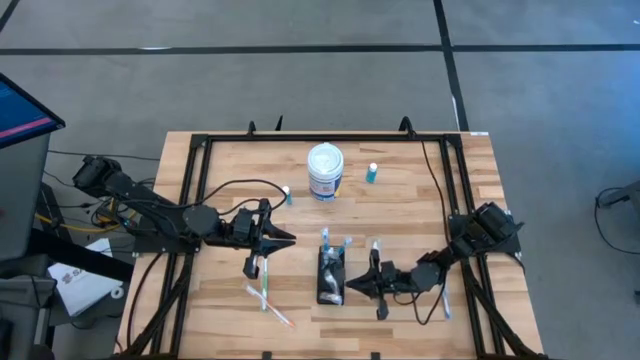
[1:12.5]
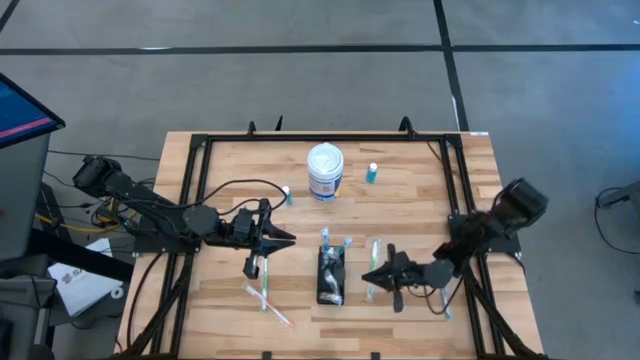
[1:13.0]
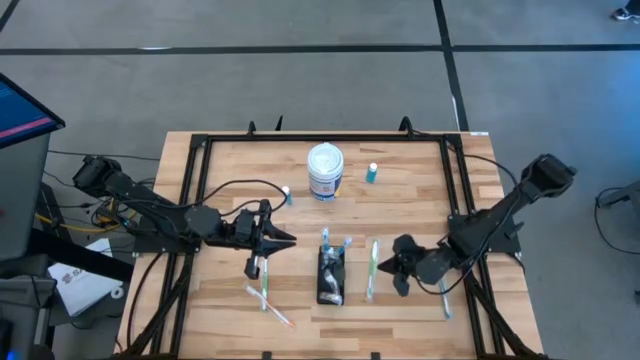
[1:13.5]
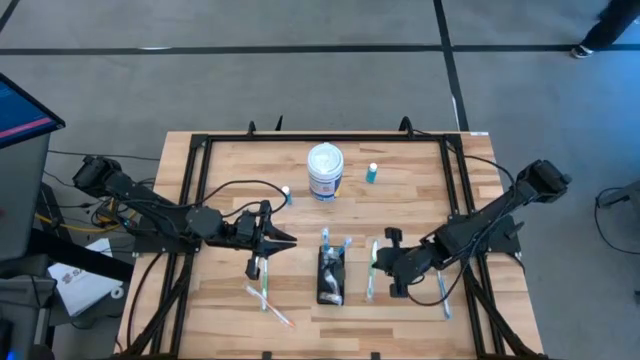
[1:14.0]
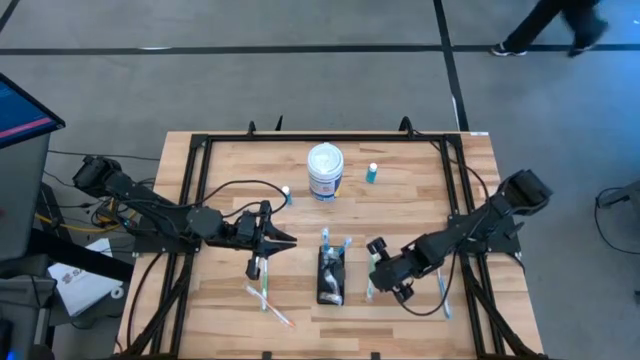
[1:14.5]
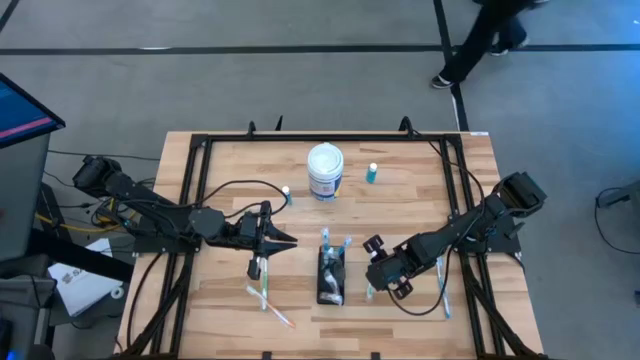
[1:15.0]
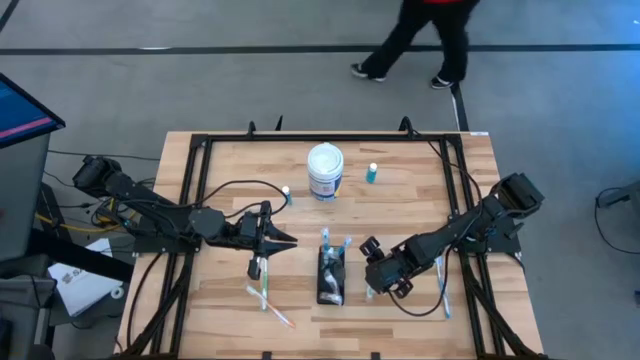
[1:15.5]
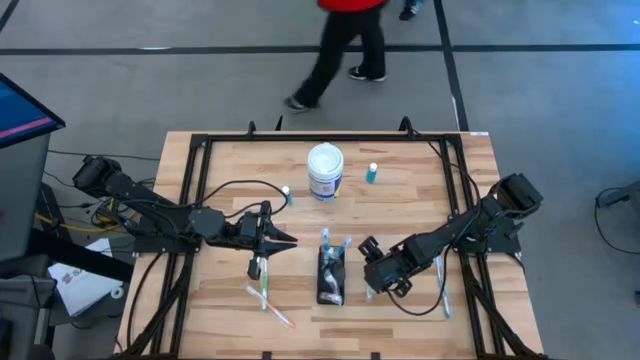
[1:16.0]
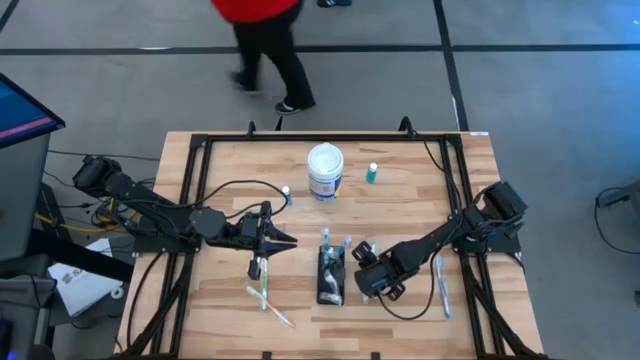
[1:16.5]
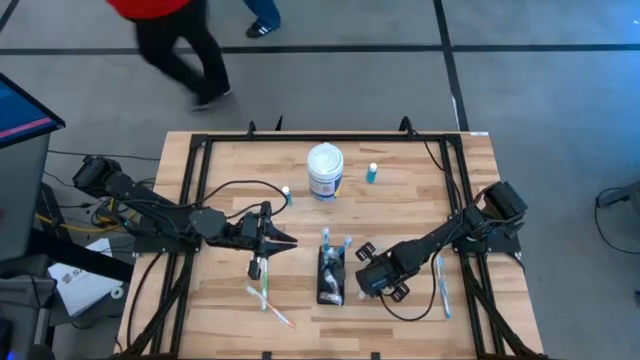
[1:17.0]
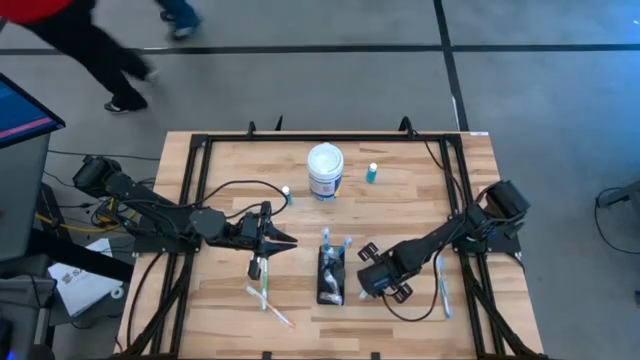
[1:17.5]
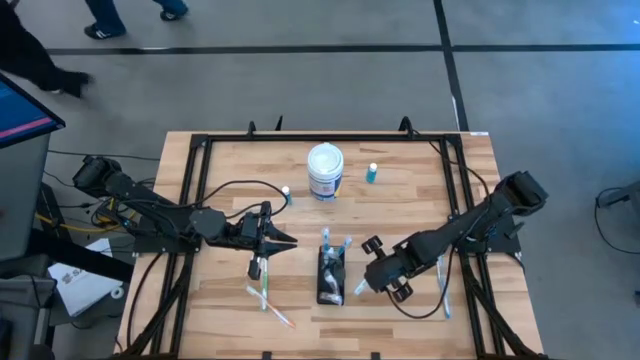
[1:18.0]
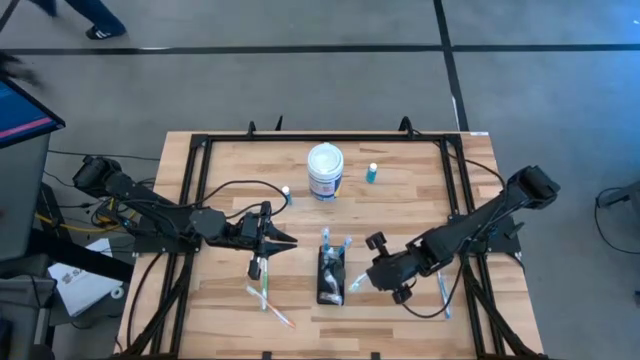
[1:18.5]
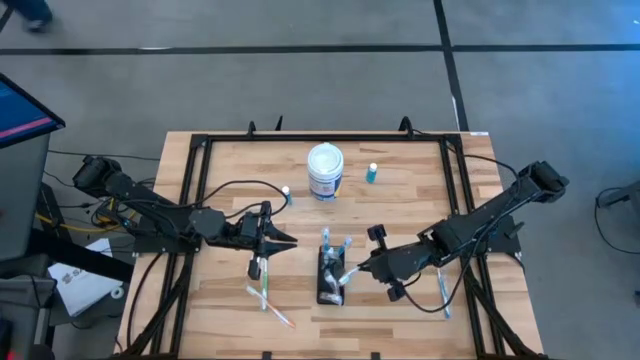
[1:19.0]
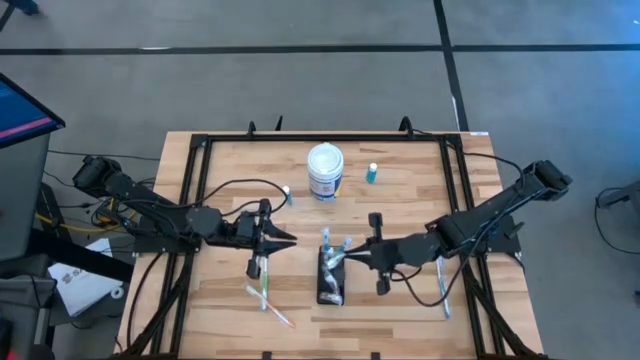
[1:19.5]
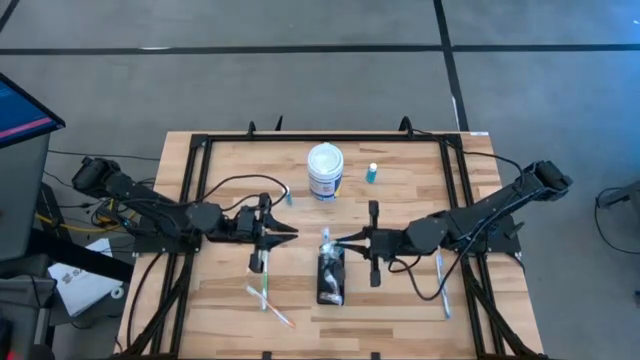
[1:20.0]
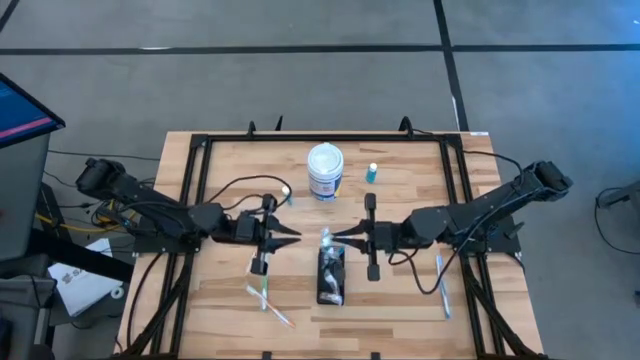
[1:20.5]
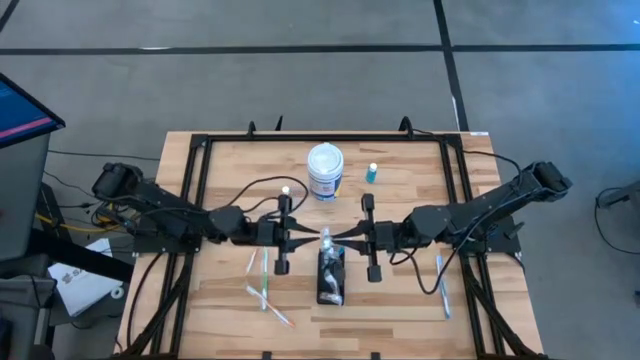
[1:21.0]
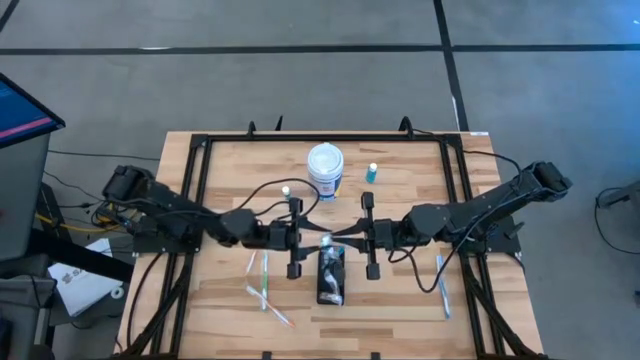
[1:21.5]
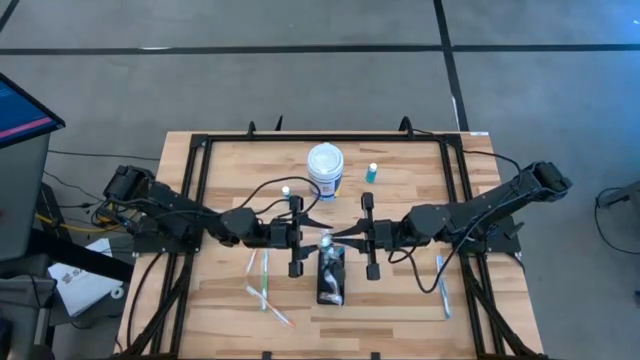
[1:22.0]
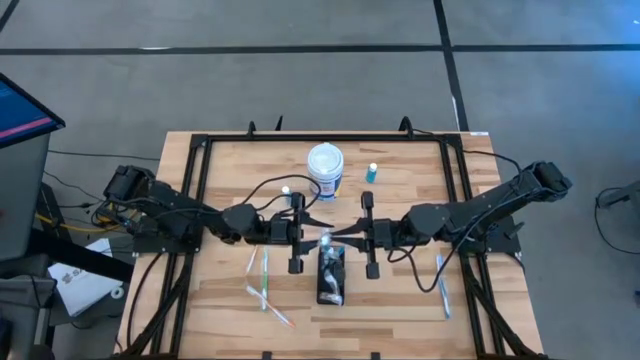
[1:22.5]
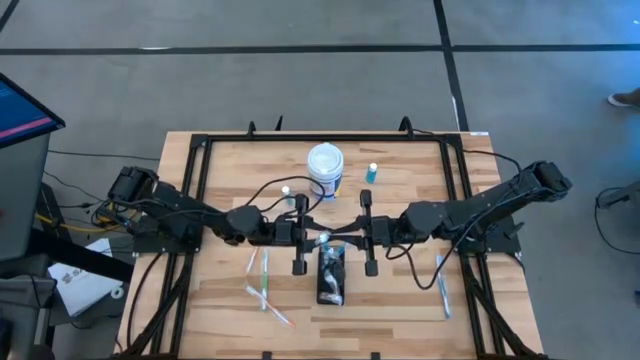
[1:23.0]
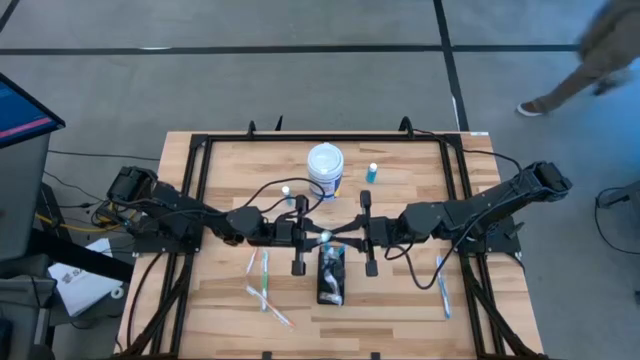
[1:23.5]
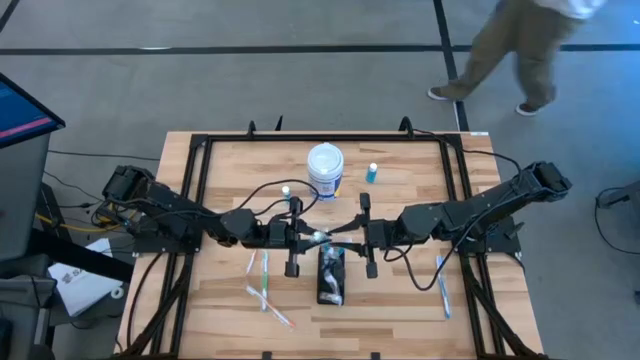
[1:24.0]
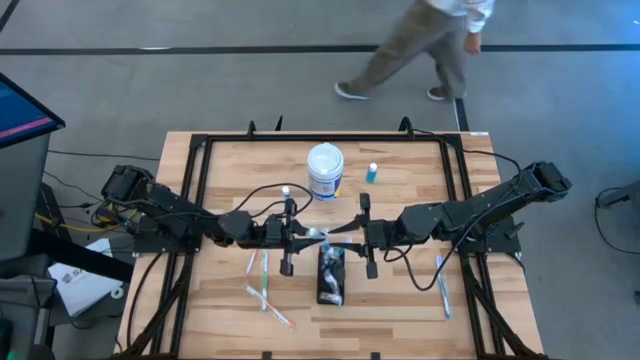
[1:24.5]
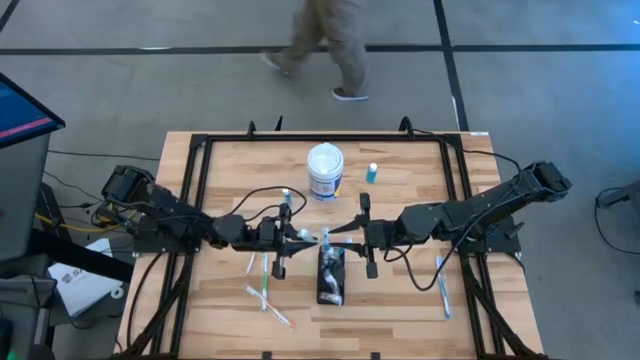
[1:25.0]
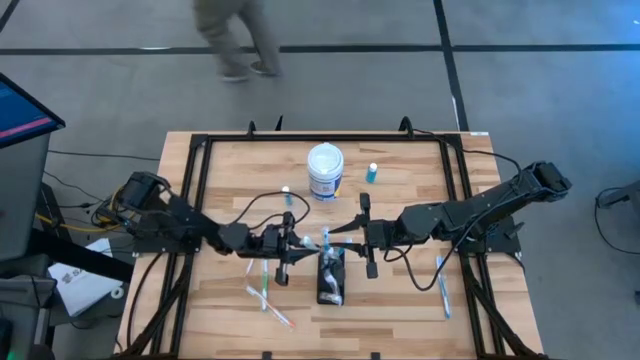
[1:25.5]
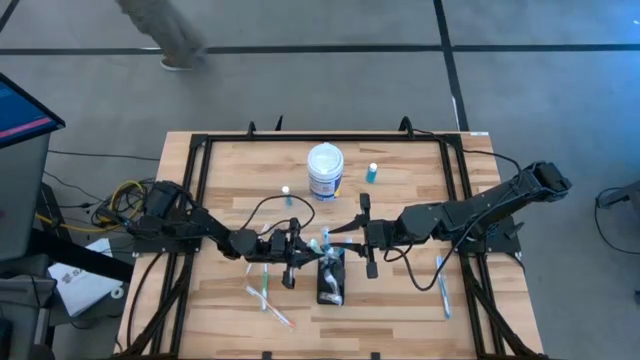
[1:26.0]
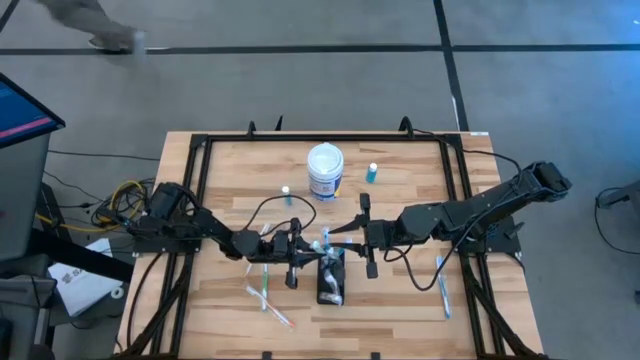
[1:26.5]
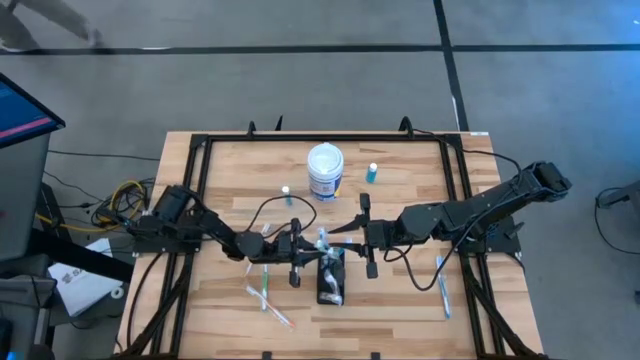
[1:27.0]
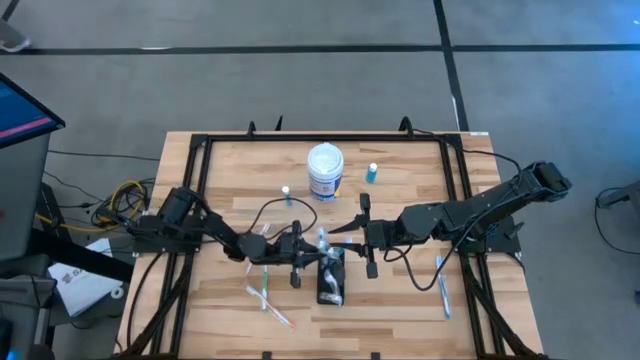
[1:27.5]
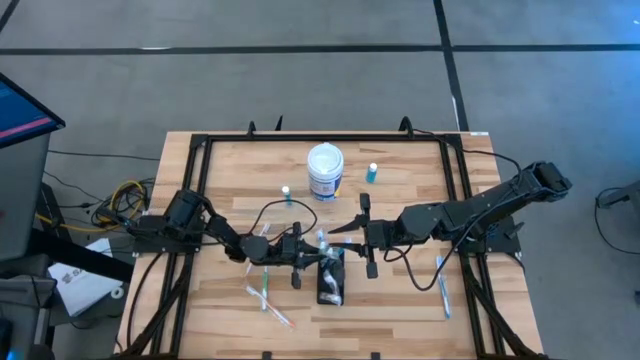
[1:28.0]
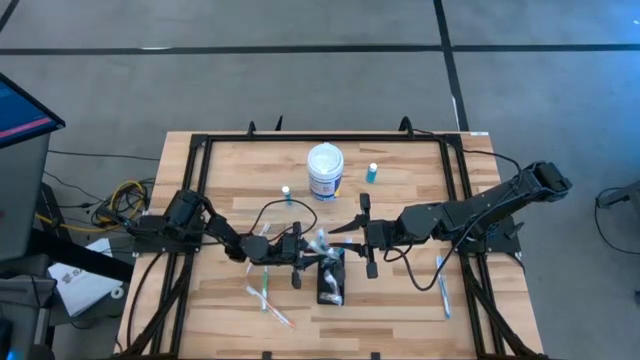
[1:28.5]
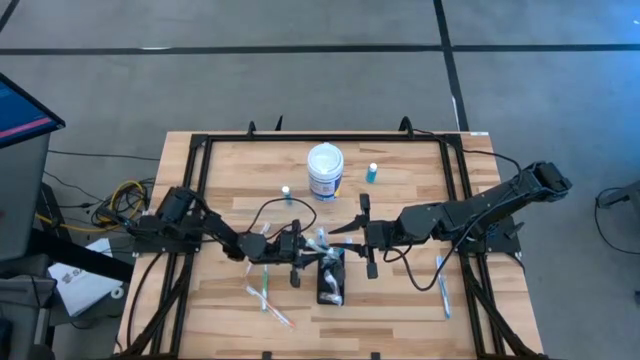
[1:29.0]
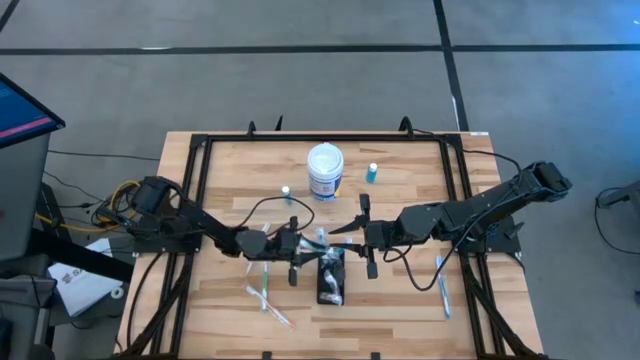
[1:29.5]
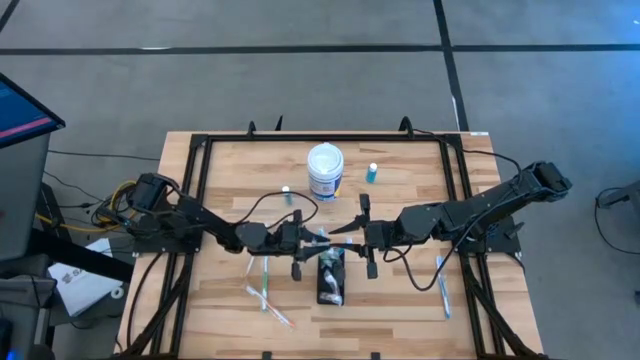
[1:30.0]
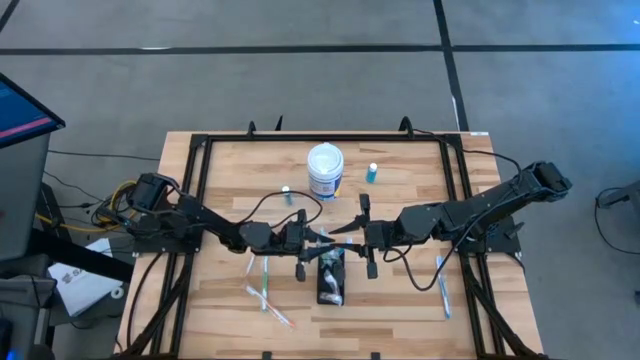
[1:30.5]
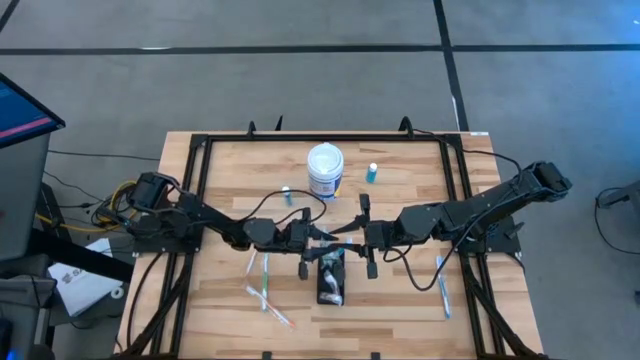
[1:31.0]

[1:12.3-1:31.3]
Task: Pick & Place toothbrushing station
Put the right green toothbrush into the black mesh organizer

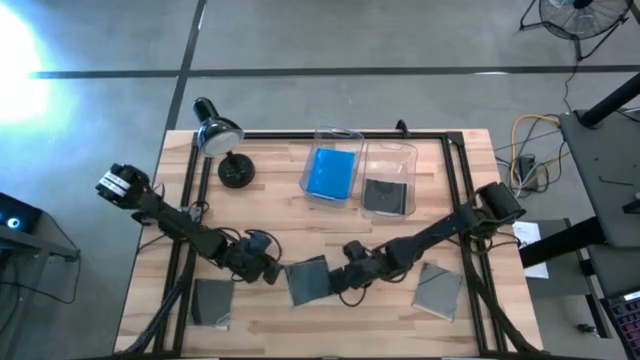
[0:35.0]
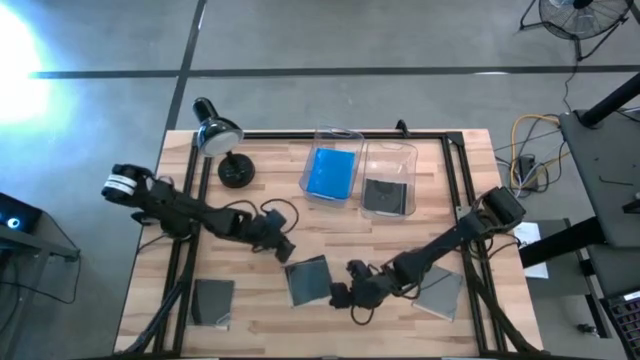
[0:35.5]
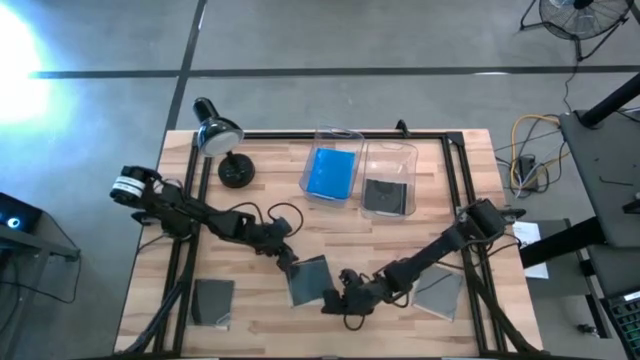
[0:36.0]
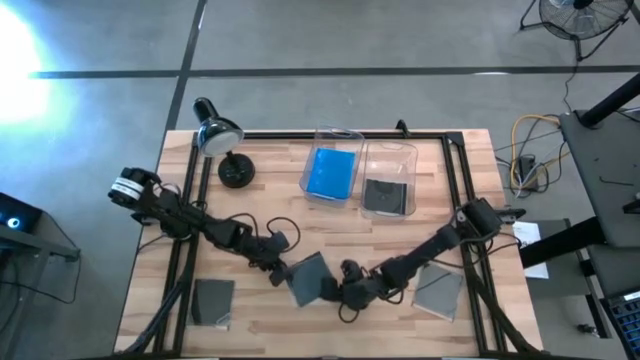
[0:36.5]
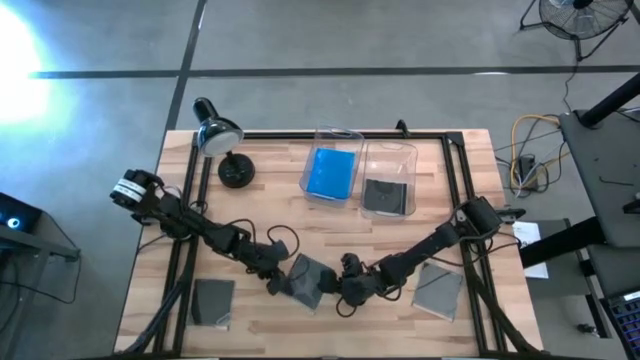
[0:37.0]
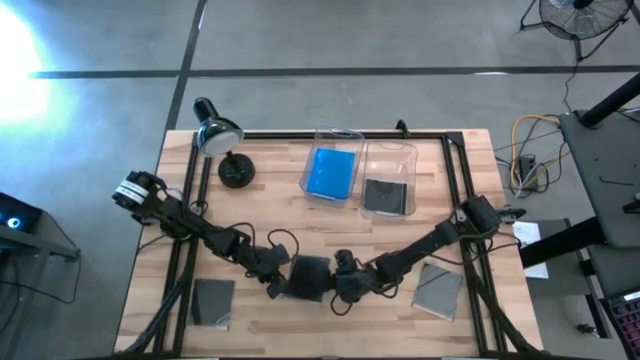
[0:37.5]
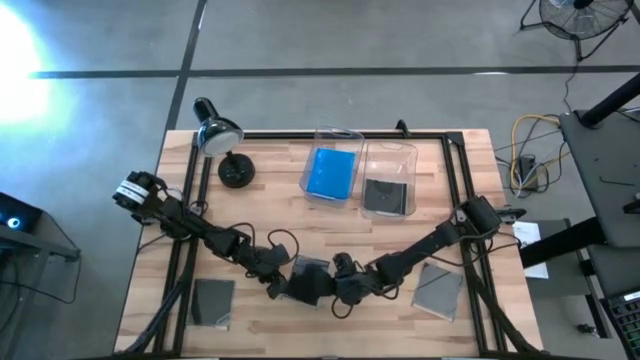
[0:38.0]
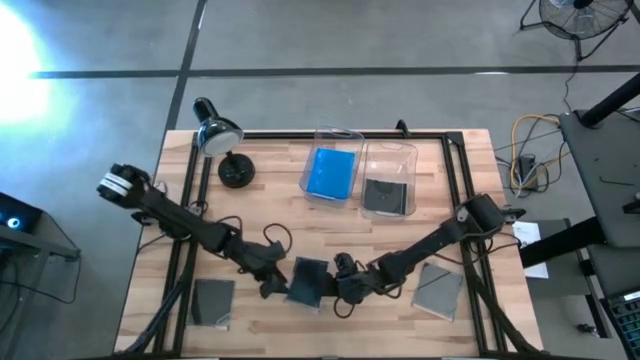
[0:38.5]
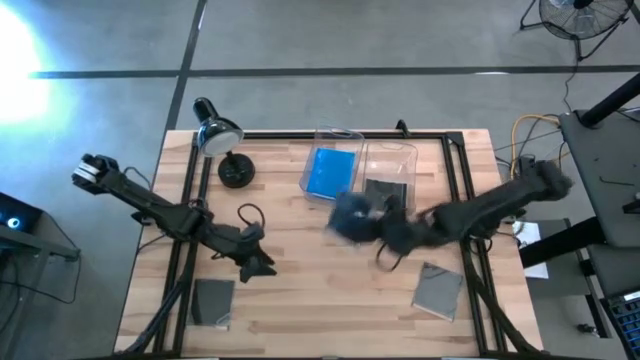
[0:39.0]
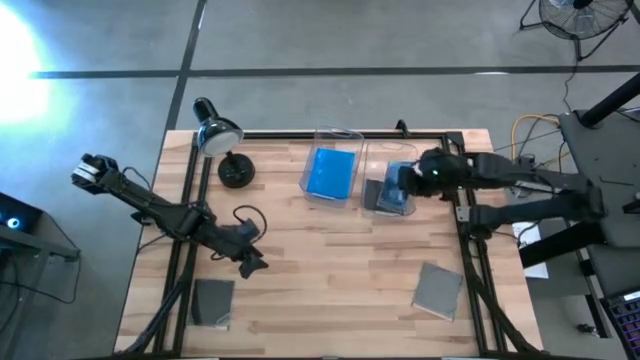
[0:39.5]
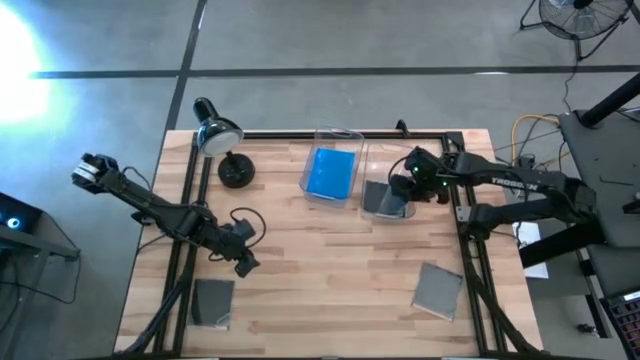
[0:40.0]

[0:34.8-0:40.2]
Task: Pick & place jewel cases by type
Put the black CD case into the right transparent bin
